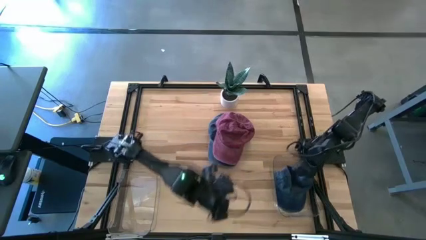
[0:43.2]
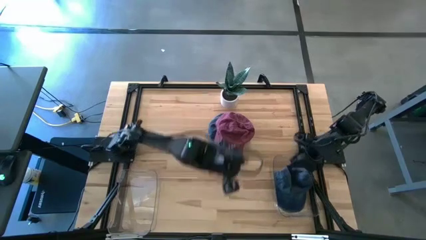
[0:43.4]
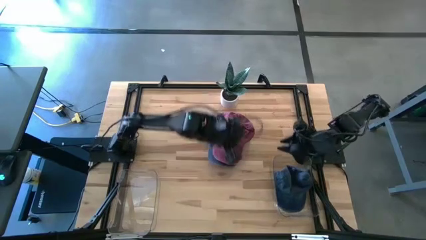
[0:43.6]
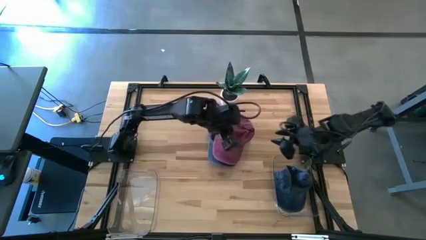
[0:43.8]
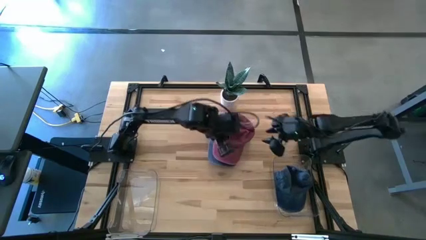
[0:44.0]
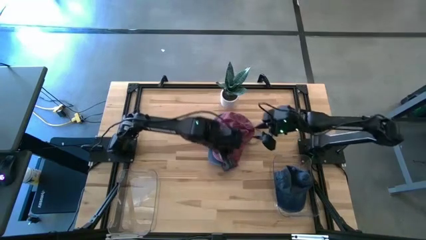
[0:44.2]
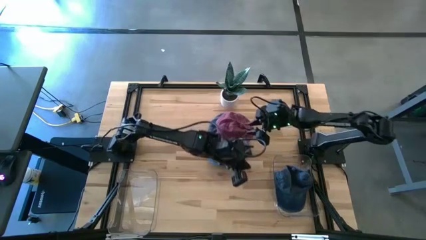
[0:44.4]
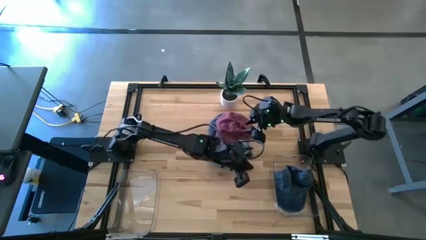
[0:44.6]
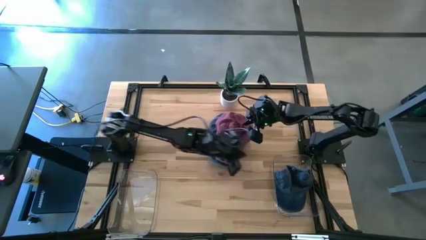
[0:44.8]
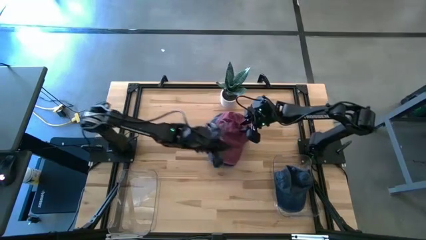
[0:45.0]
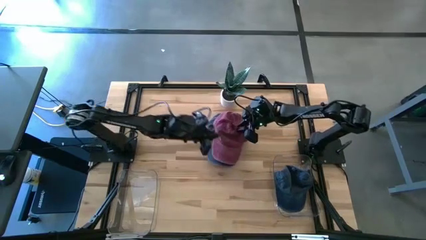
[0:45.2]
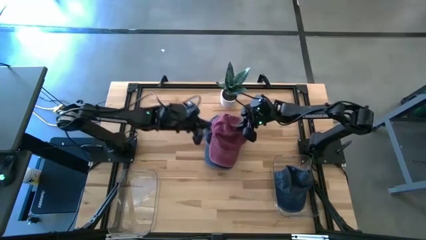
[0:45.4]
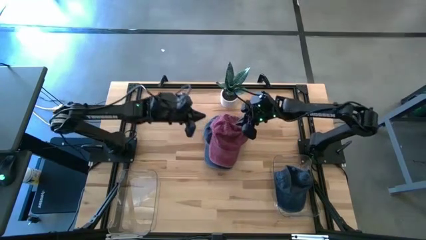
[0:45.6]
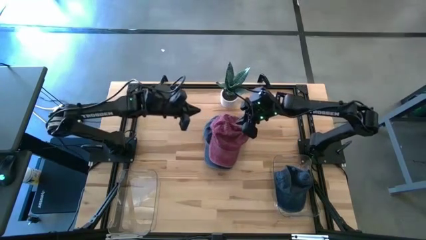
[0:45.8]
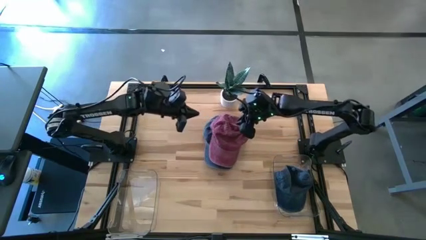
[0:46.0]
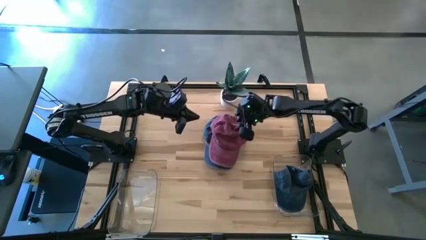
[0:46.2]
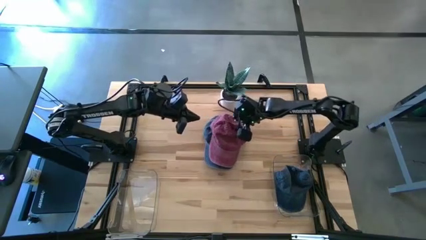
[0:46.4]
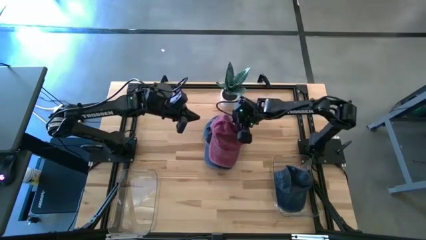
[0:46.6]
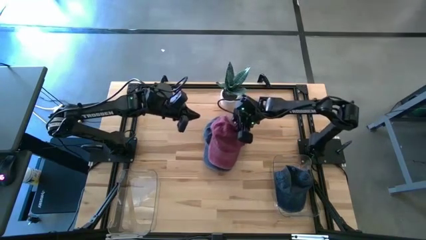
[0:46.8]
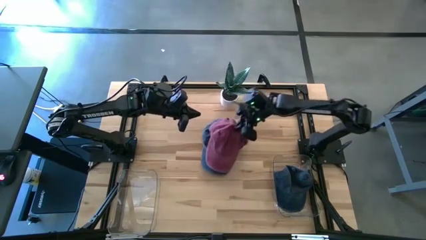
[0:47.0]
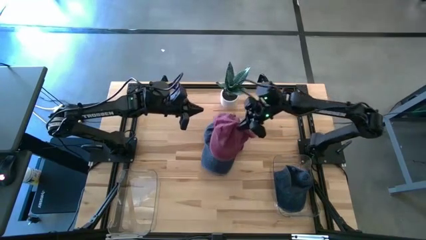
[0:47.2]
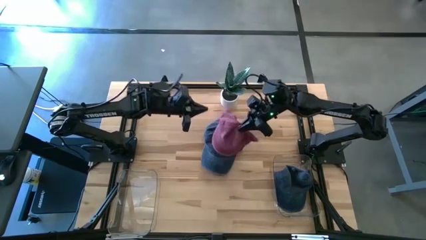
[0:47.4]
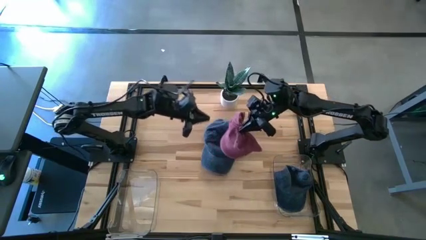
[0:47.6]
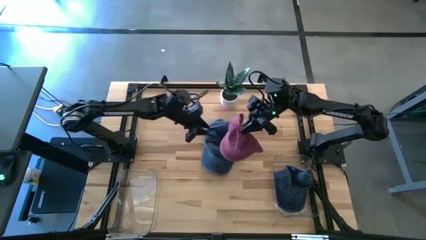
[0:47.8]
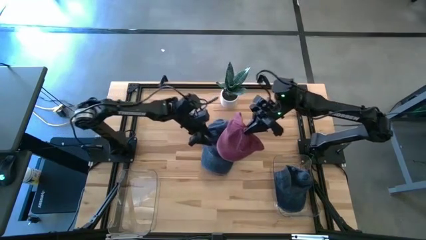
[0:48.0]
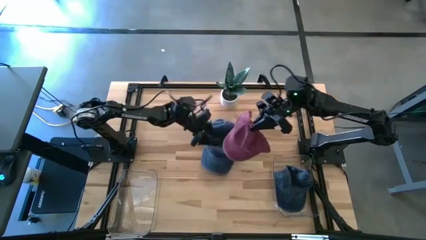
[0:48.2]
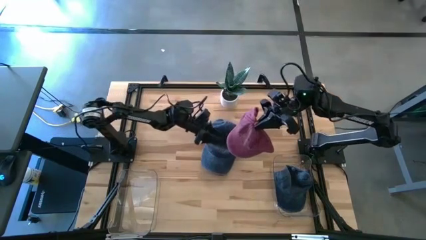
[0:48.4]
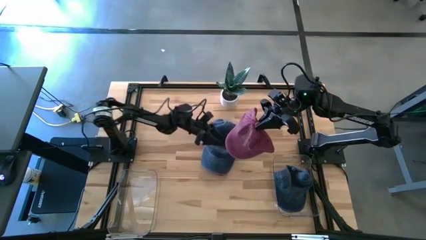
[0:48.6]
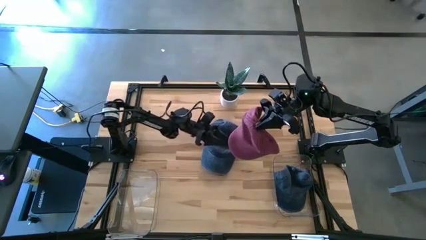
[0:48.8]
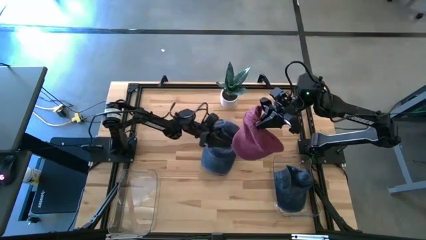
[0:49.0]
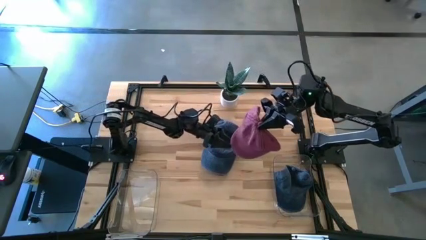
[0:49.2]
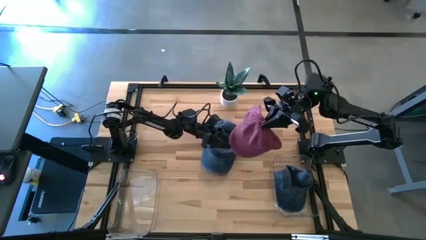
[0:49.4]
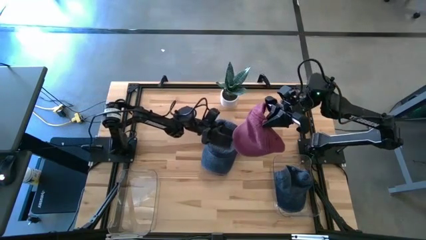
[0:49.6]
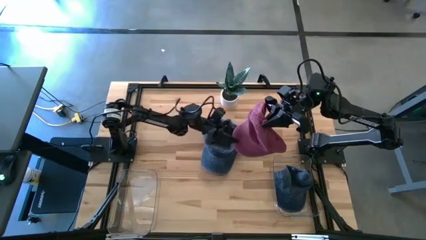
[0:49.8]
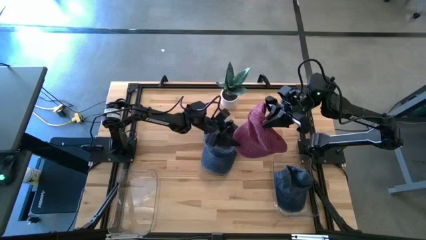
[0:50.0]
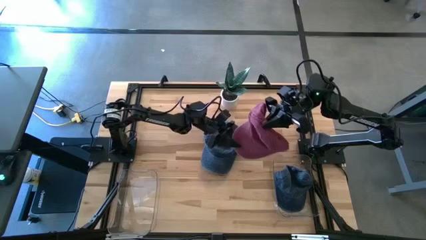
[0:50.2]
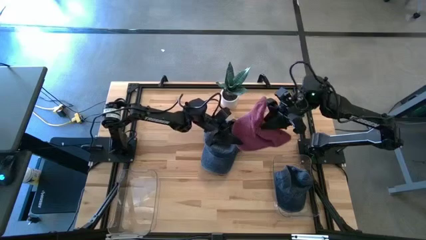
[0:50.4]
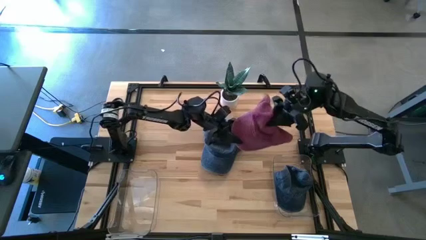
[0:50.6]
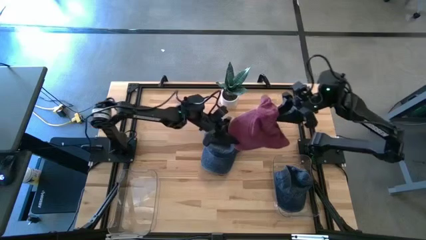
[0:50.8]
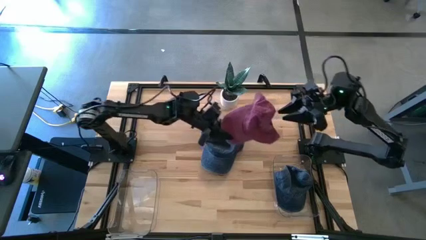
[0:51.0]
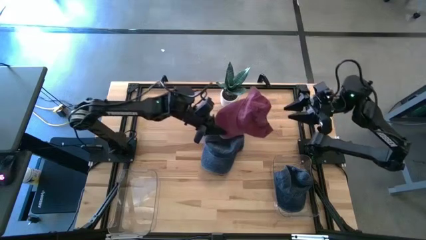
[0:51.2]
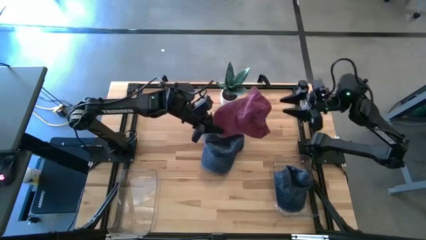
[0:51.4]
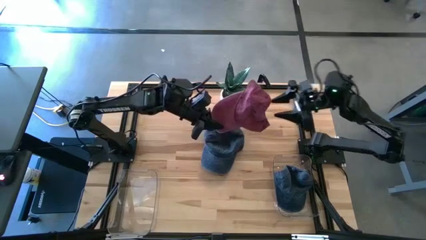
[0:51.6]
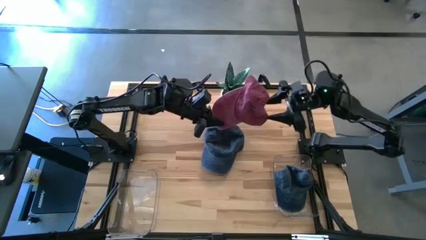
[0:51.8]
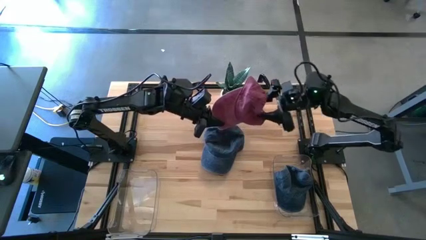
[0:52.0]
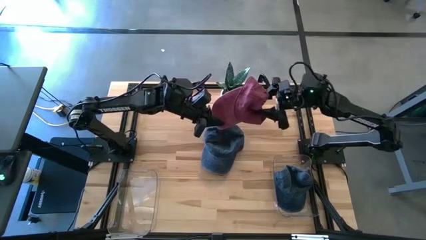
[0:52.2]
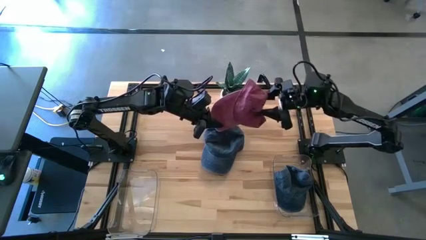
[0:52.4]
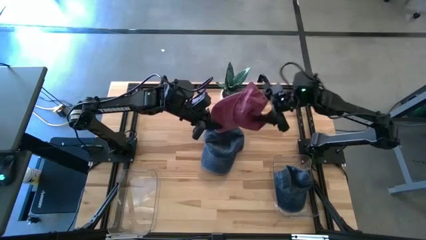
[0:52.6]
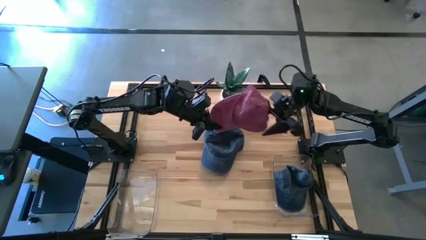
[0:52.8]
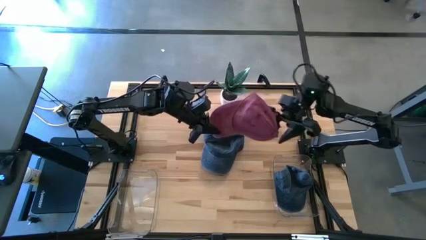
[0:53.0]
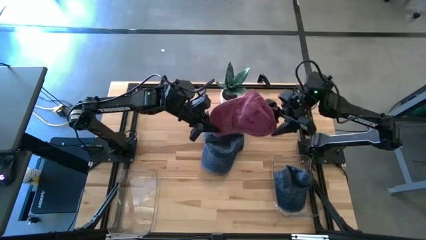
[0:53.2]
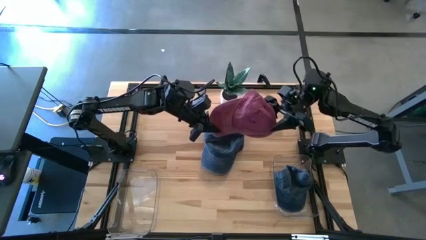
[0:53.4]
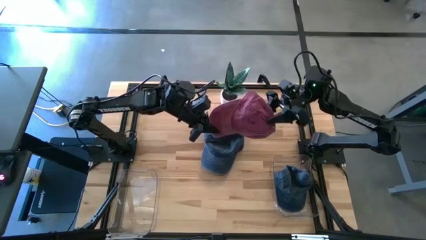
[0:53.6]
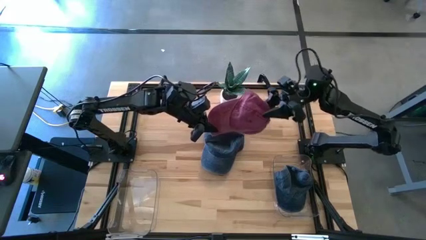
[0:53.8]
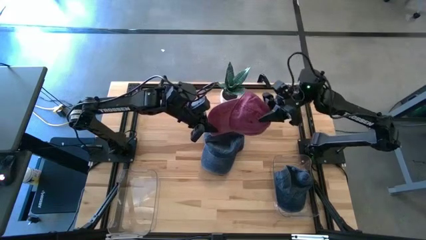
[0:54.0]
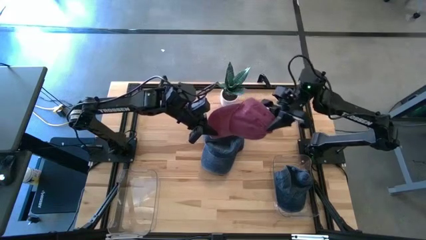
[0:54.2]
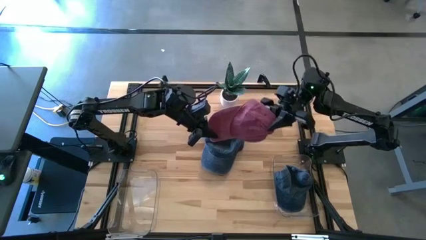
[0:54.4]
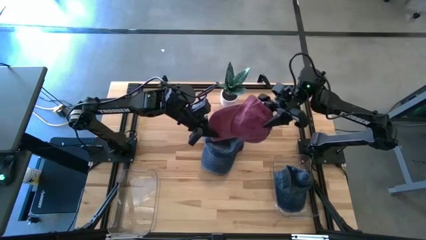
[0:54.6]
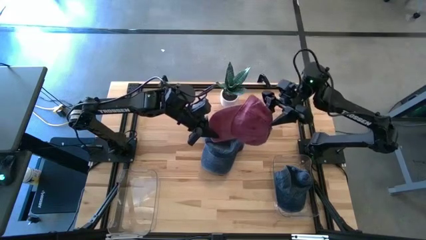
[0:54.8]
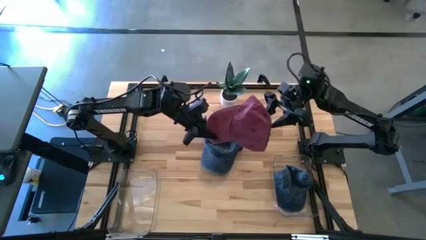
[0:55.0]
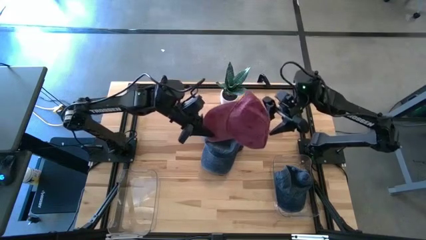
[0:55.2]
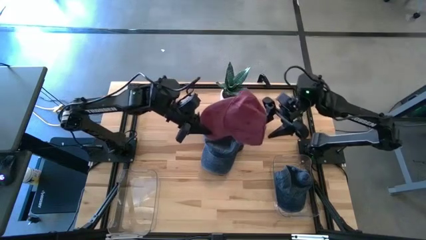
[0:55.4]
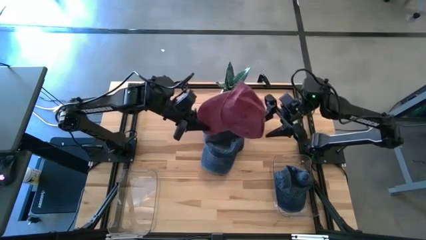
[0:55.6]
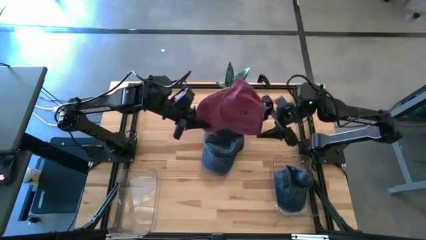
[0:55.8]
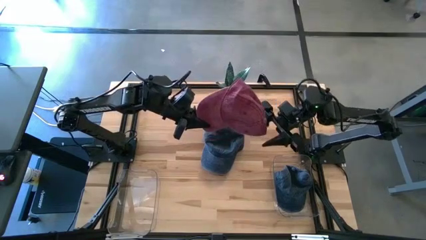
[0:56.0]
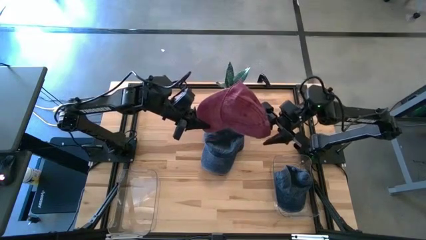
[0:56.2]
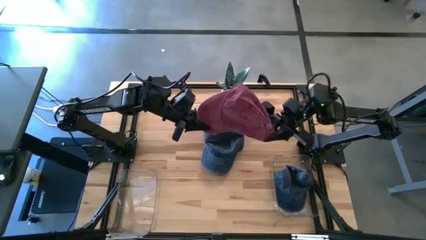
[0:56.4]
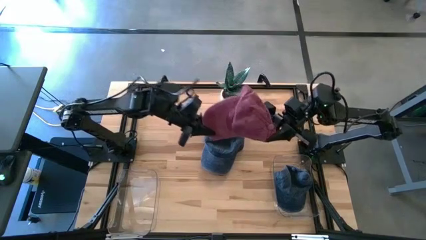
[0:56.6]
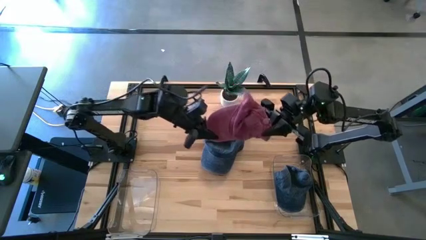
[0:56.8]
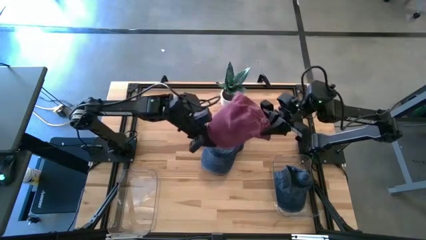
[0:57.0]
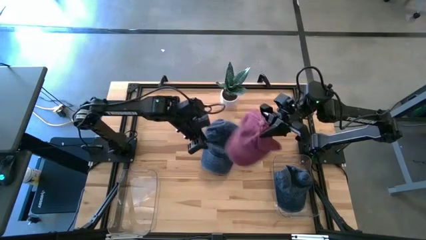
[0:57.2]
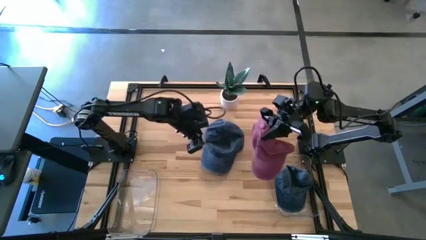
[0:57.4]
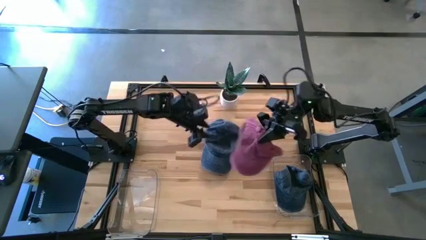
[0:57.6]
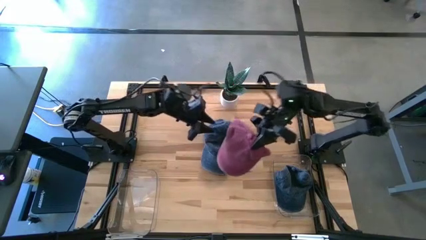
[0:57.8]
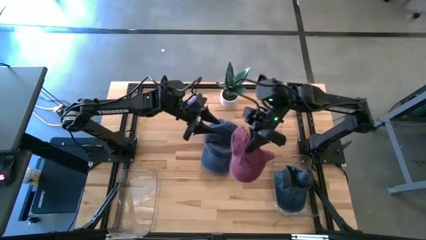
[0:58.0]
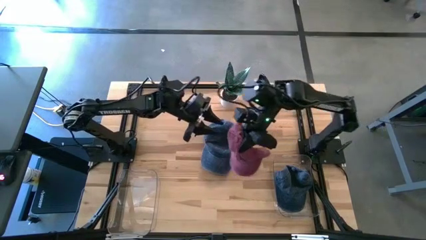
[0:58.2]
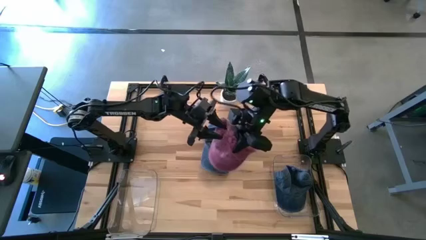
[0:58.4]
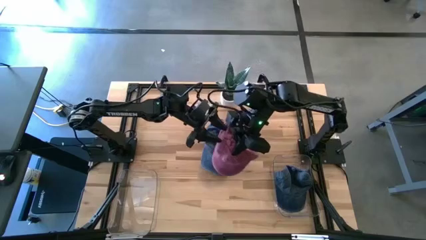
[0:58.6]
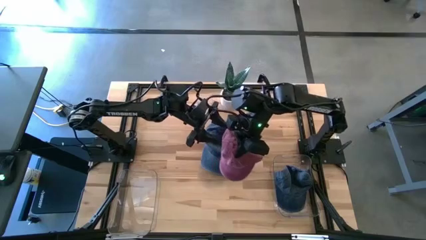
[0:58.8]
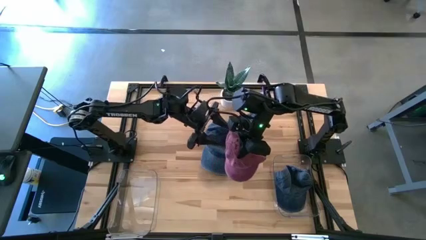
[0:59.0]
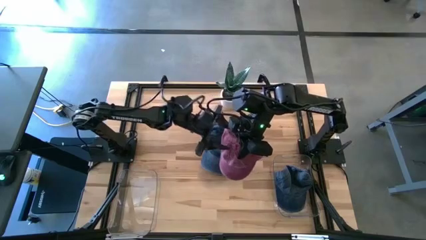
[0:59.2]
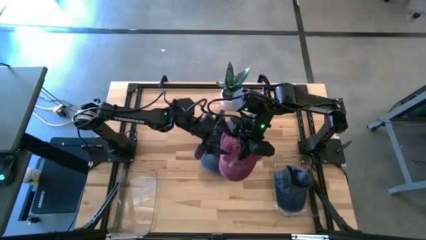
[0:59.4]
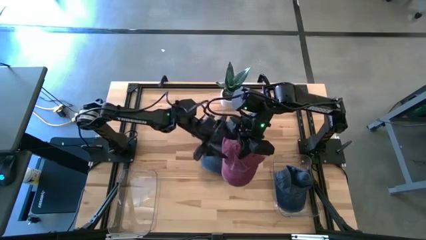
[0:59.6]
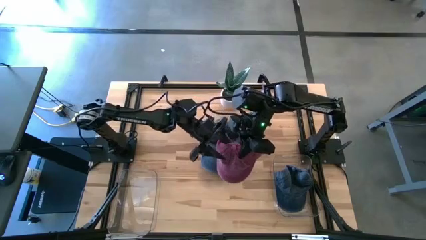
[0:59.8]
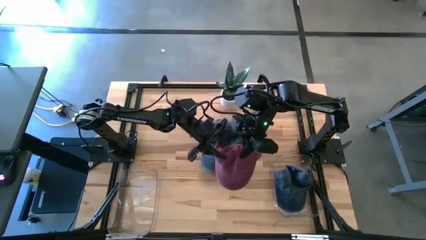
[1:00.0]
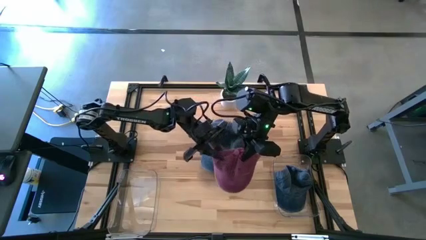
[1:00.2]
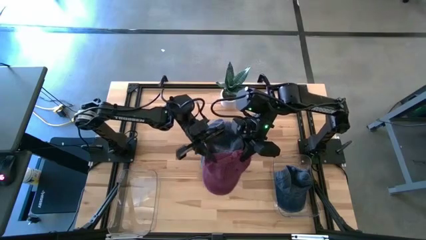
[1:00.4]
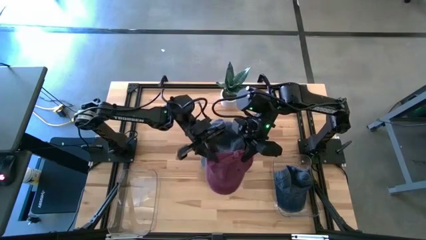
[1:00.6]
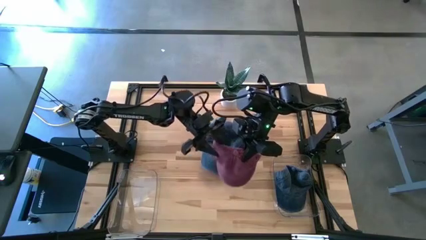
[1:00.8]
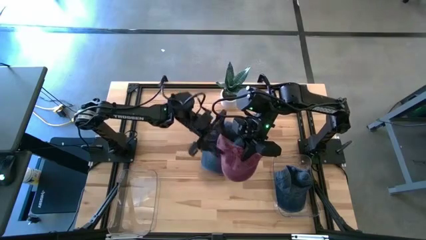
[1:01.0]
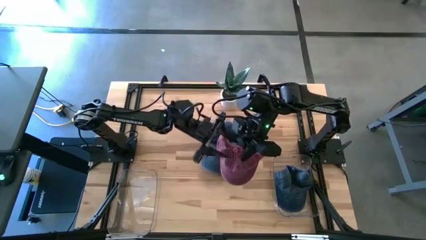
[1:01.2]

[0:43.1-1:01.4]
Task: Pick & Place hat
Put the red cap into the left transparent bin
